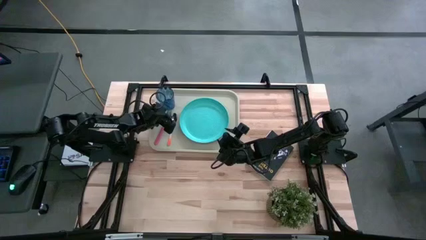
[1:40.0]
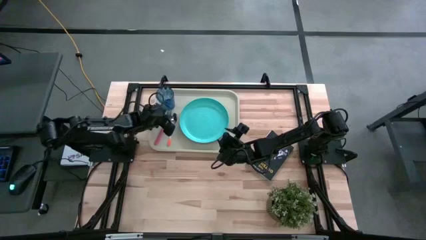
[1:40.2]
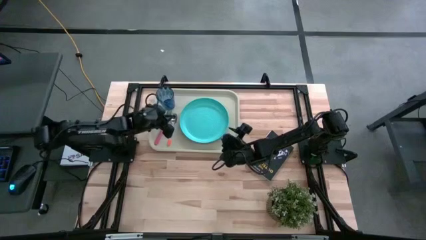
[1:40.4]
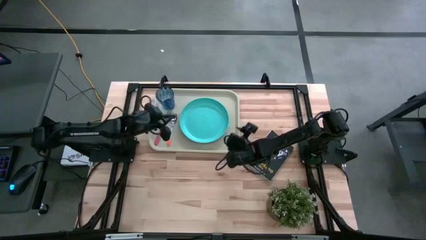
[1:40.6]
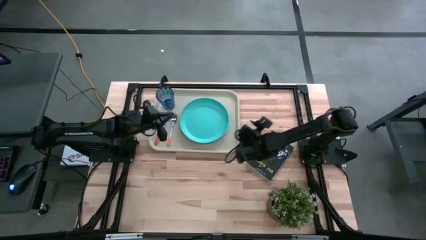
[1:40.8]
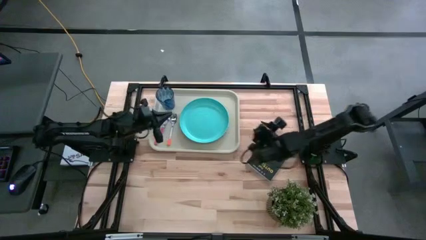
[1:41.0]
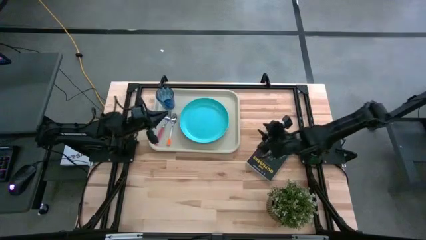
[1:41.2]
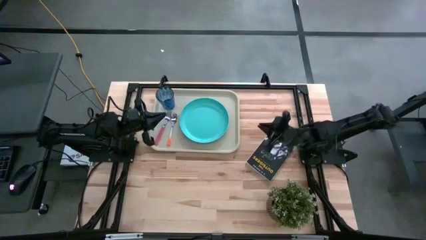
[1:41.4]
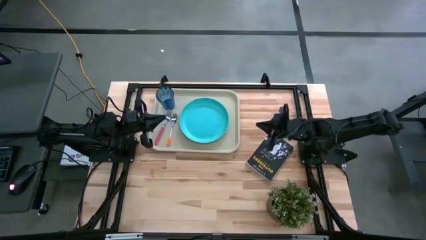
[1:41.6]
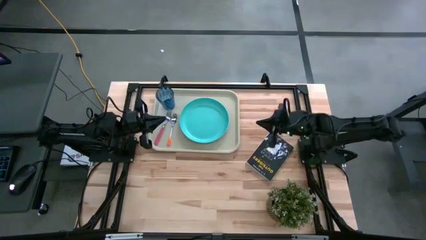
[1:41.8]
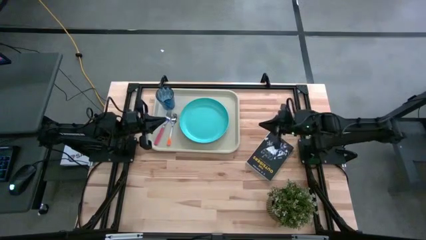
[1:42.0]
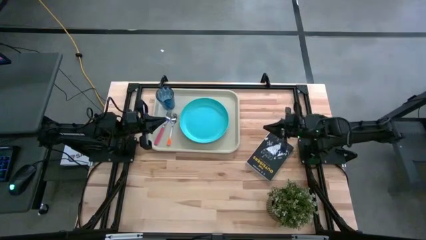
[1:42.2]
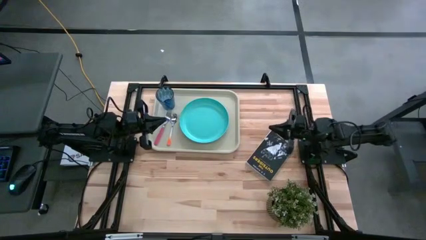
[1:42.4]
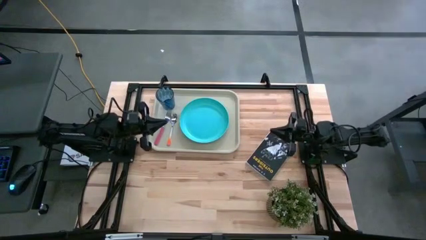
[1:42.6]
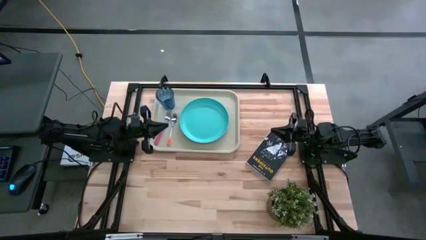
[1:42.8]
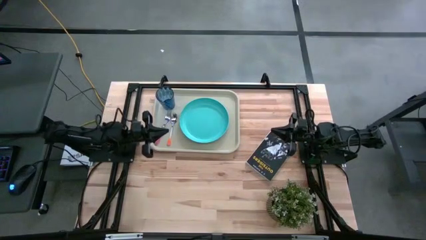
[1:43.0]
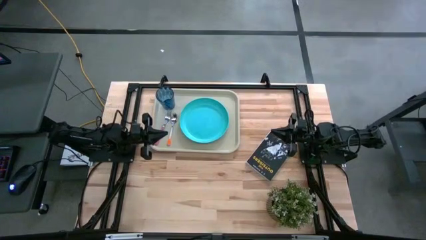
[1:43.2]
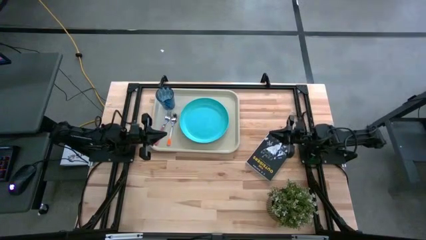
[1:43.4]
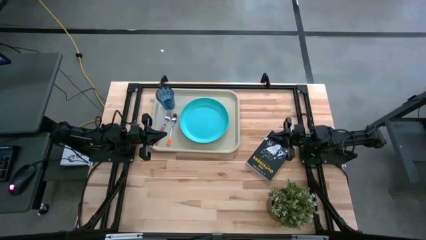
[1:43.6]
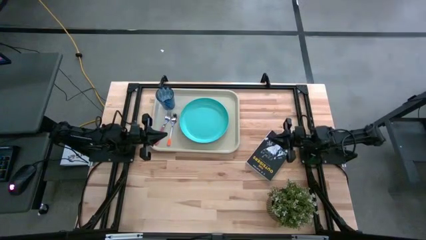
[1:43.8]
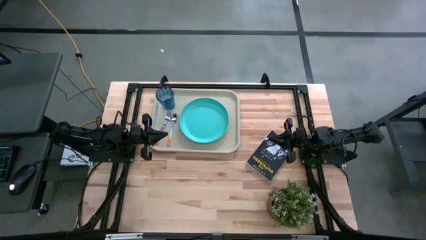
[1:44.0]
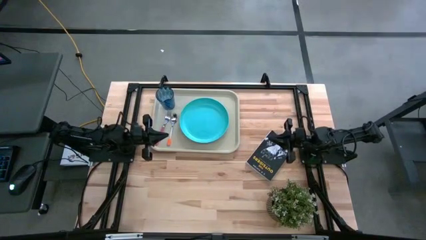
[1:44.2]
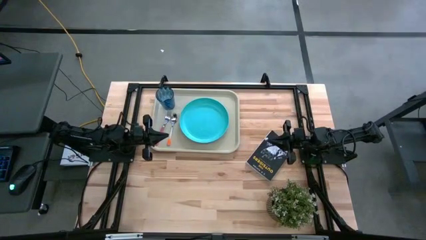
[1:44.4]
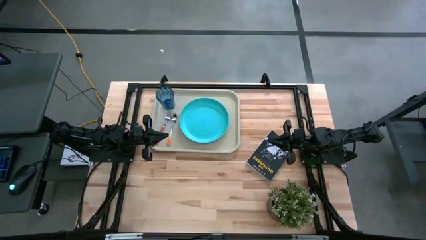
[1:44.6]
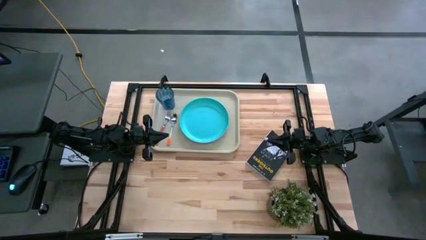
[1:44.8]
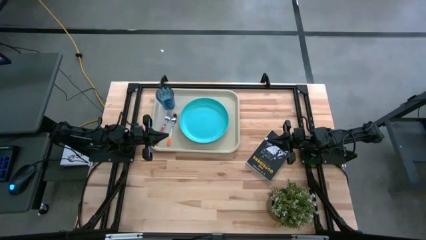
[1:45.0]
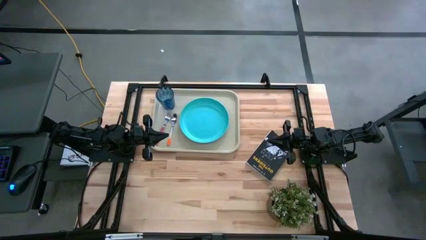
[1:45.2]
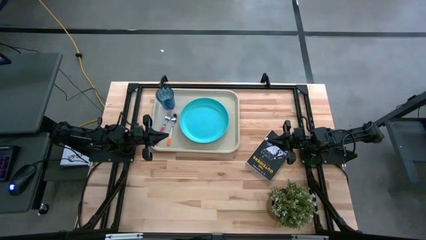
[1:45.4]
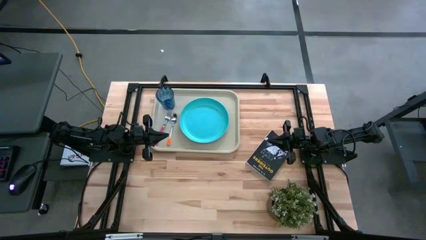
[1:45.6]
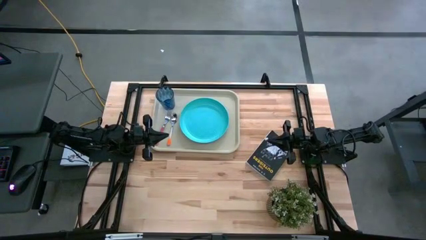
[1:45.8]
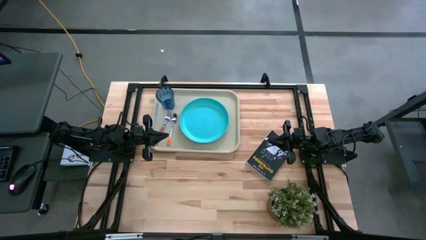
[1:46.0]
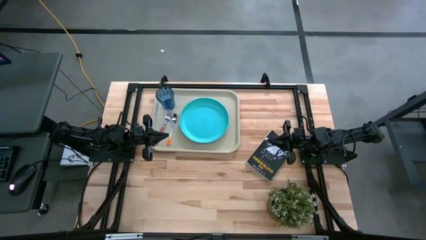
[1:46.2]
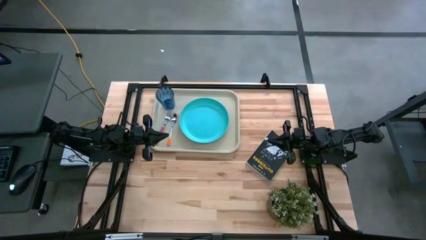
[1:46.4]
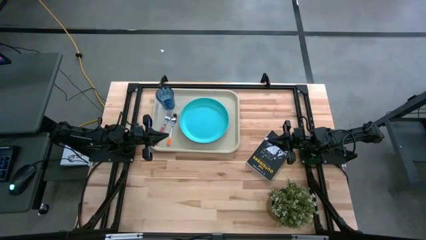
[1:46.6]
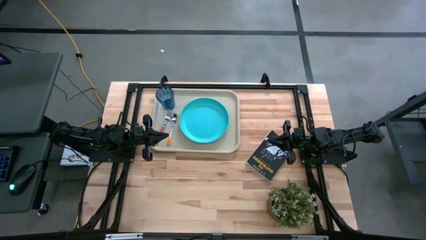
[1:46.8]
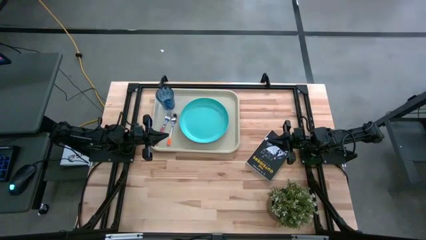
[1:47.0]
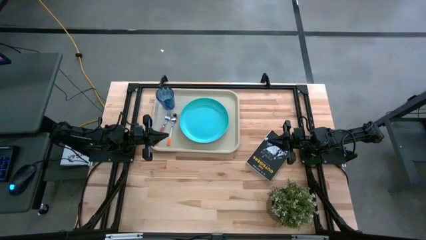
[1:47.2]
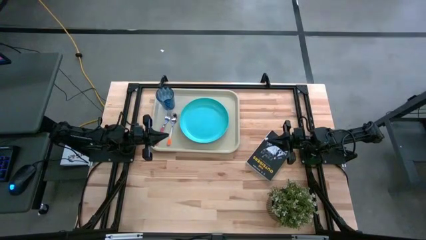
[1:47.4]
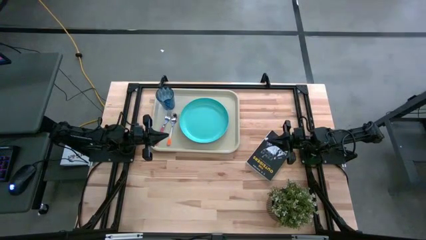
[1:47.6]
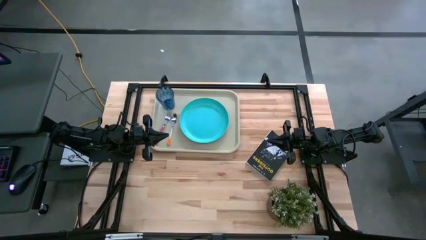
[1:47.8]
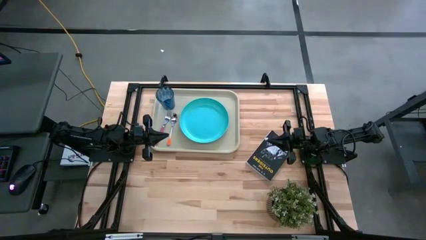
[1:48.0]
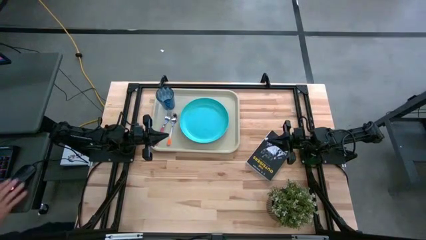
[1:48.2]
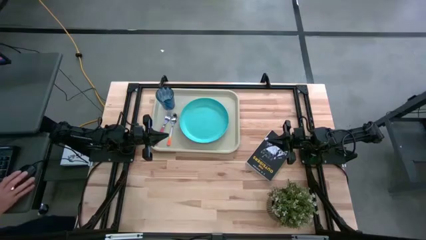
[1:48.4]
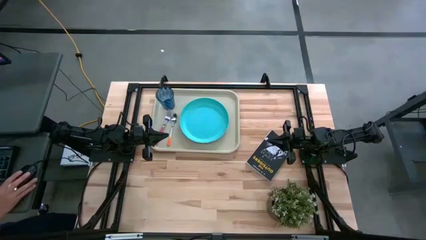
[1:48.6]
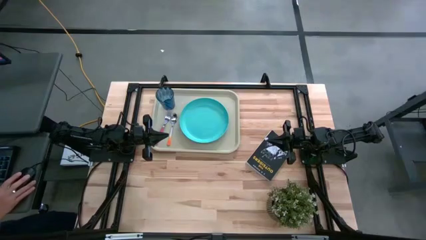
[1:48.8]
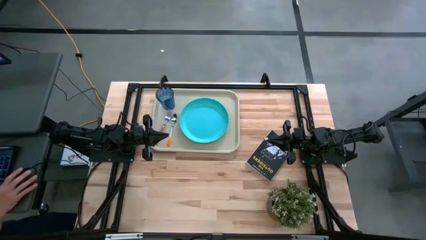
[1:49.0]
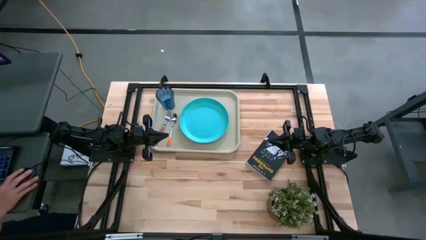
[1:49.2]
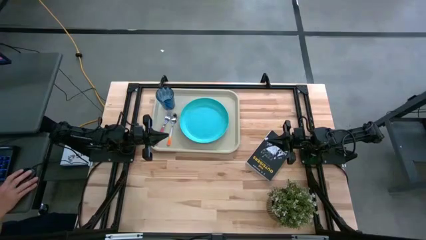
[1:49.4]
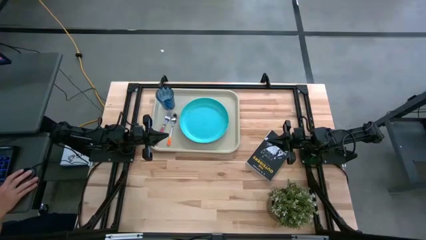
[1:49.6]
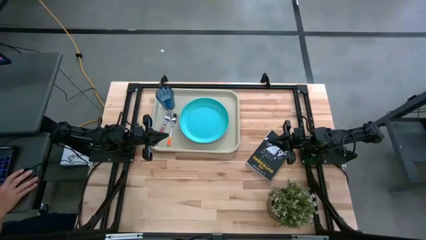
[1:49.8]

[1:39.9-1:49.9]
Task: Pick and place plate/cup/fork/spoon on tray
Return to Home Position

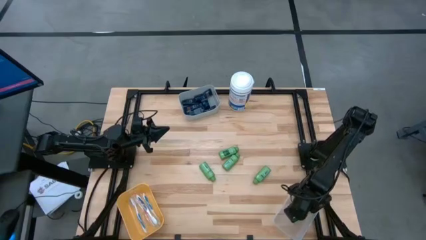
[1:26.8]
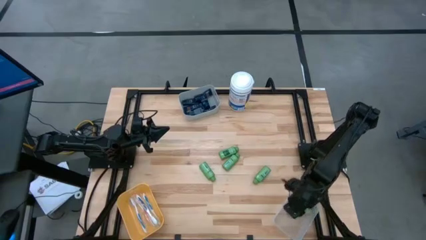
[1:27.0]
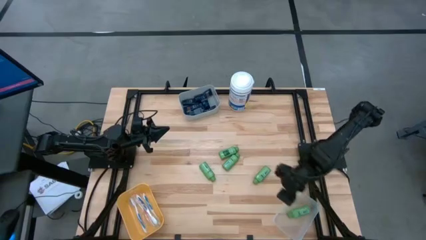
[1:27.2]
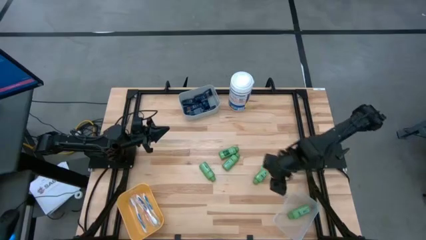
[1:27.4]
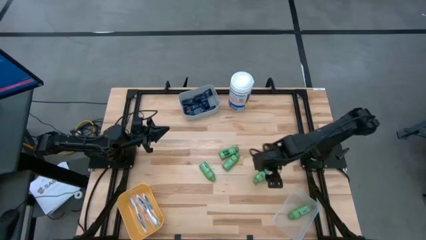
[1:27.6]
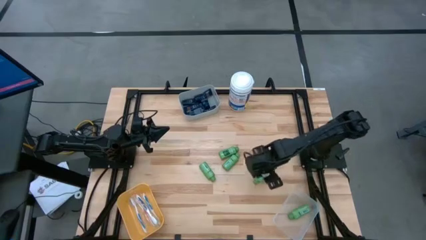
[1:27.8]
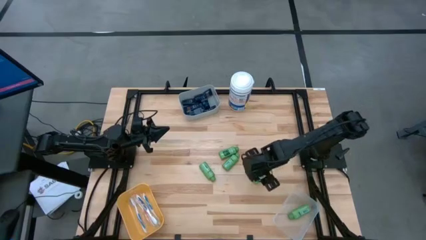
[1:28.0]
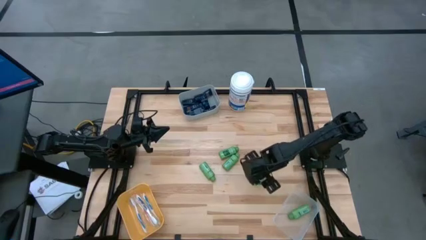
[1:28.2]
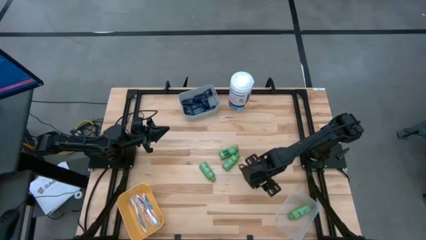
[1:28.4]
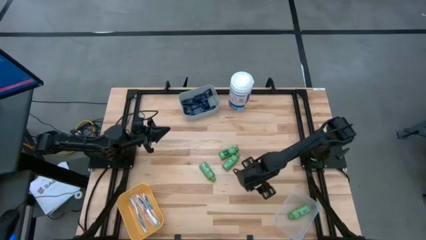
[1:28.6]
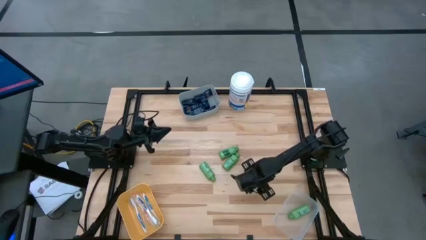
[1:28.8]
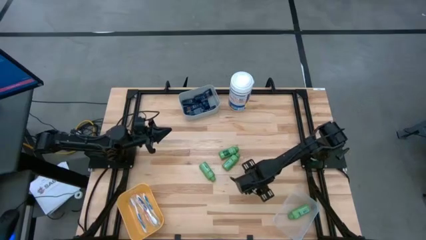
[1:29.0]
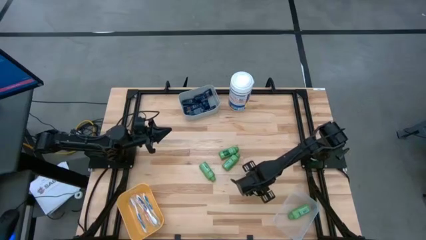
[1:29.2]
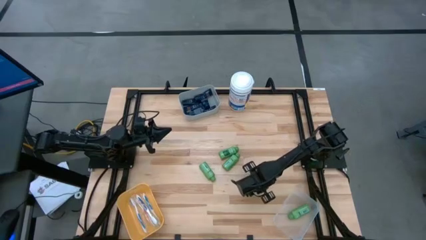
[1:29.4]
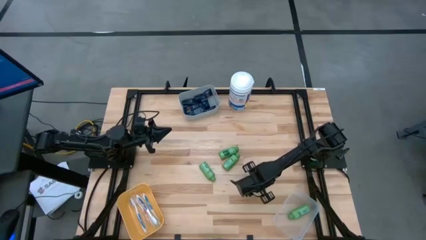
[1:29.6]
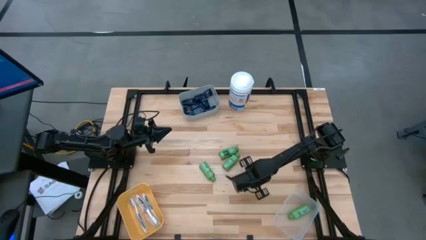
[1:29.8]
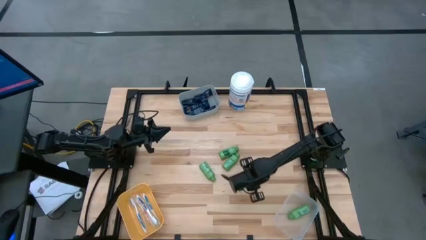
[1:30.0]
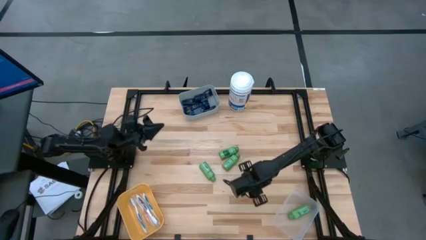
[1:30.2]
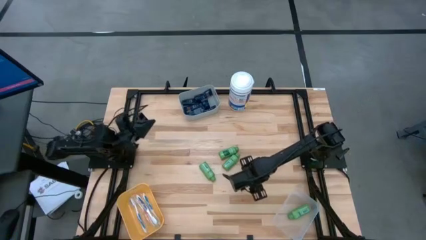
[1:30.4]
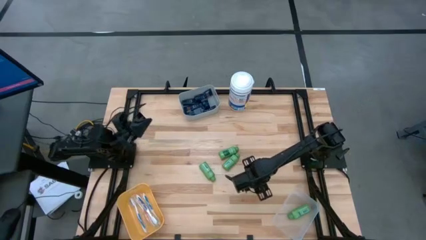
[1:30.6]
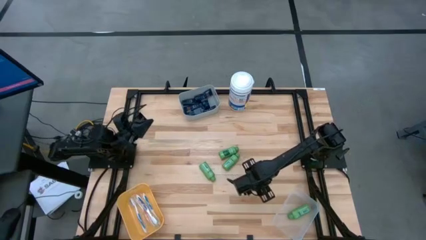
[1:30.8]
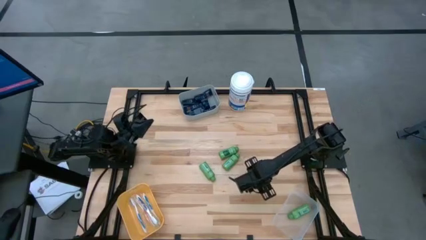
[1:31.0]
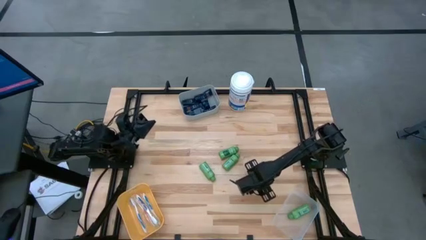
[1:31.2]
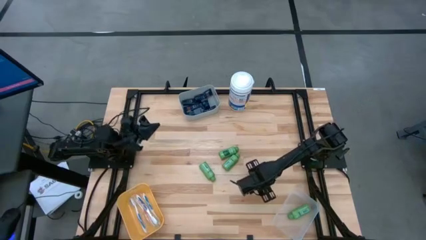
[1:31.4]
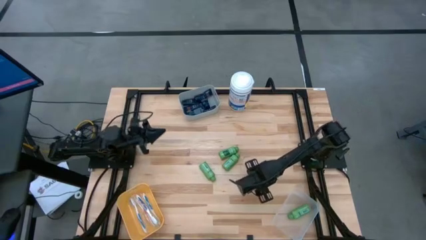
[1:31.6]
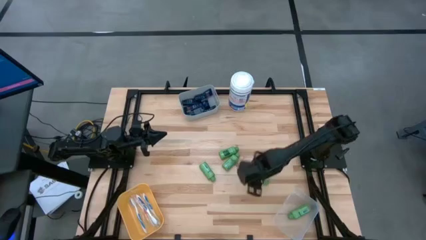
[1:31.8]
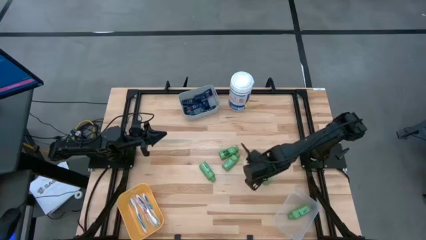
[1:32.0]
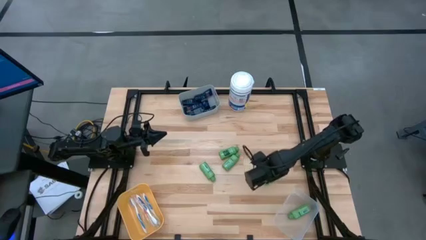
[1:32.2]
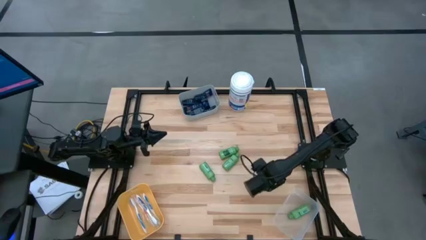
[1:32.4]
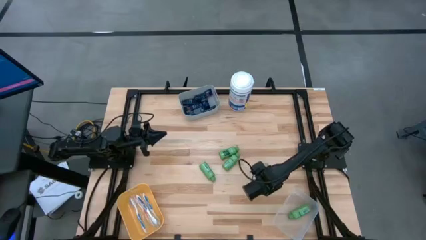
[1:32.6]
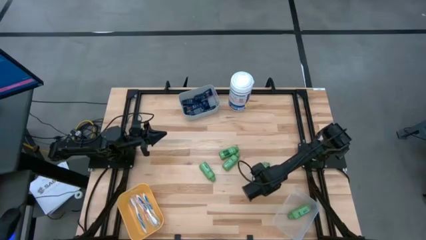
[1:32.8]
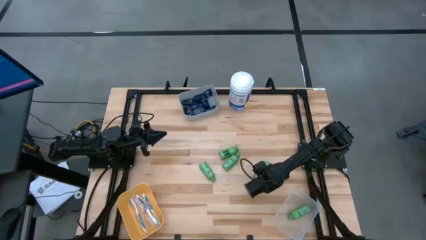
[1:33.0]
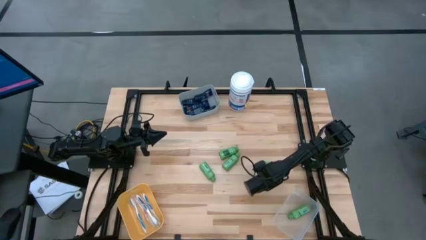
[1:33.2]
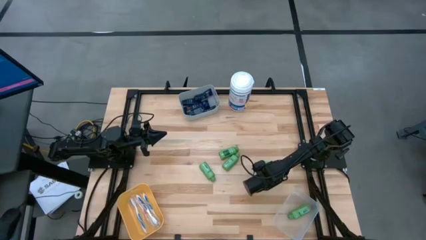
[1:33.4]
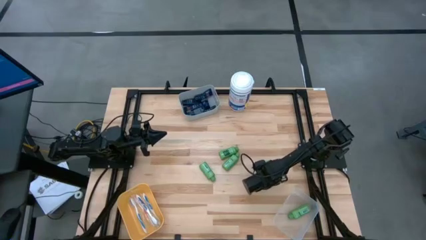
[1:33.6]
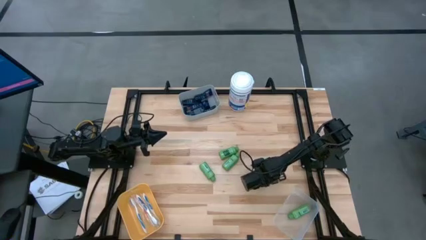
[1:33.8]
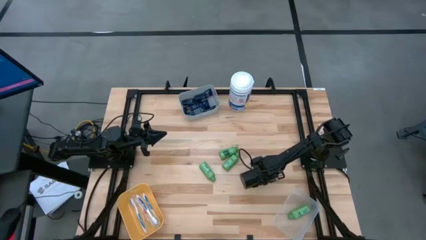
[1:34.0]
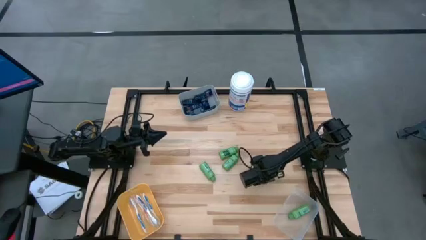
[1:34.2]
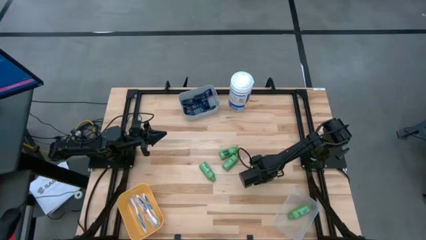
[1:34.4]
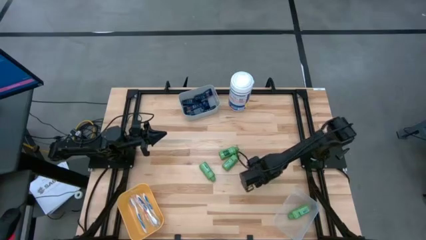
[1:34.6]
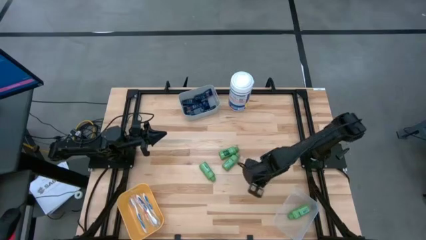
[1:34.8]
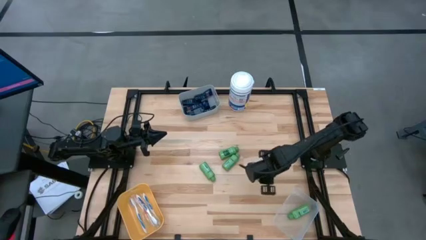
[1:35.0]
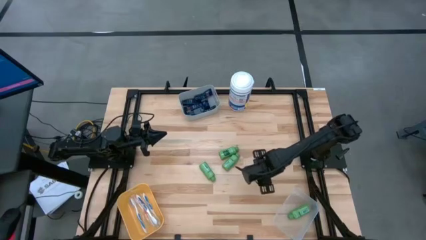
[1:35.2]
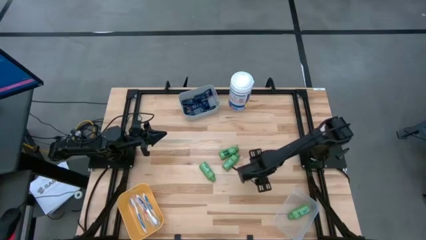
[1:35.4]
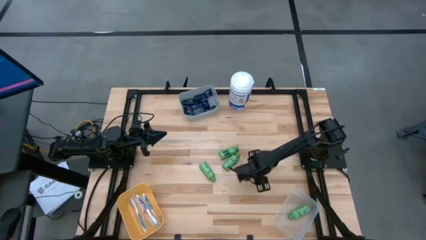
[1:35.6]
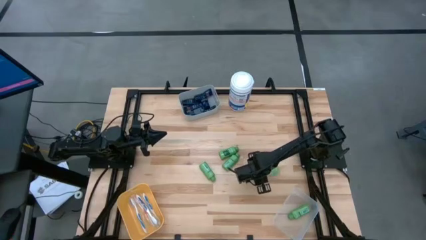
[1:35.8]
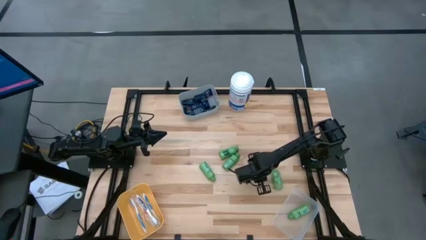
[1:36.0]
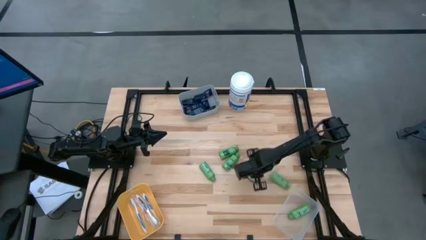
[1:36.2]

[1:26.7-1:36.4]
Task: Pick & Place Travel size toiletries
Put the green shampoo into the transparent bin
